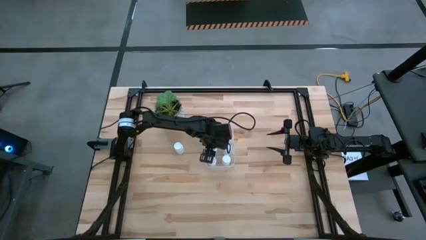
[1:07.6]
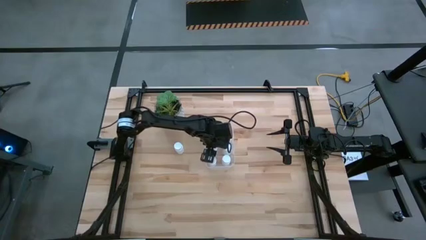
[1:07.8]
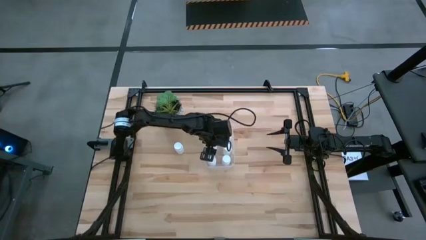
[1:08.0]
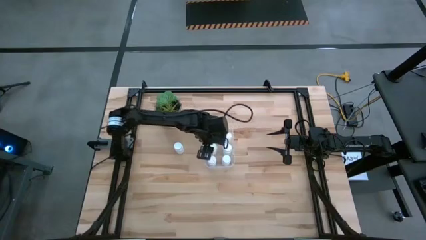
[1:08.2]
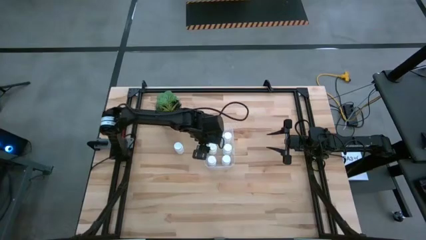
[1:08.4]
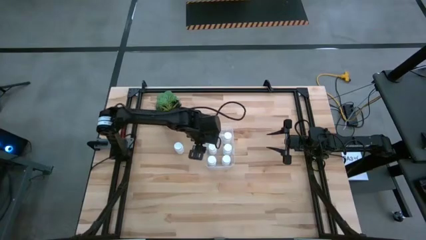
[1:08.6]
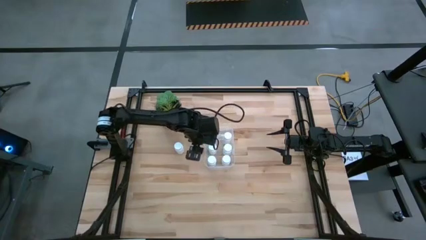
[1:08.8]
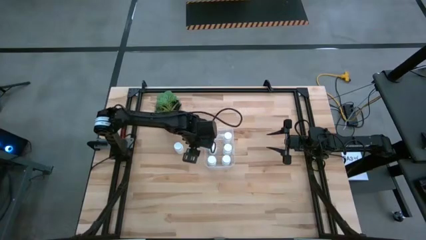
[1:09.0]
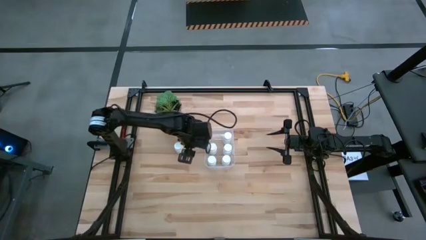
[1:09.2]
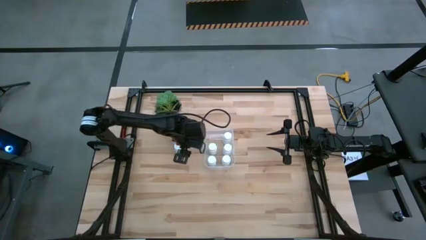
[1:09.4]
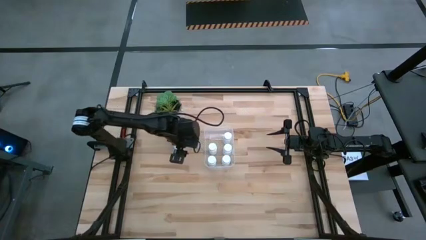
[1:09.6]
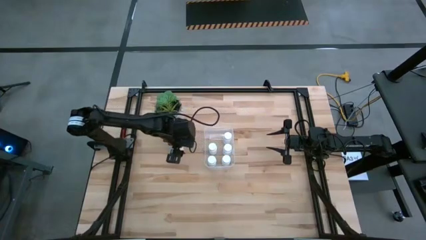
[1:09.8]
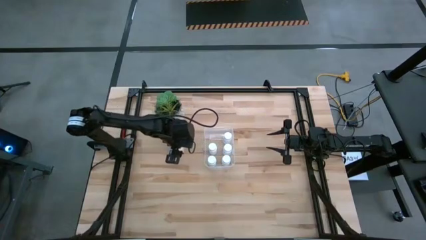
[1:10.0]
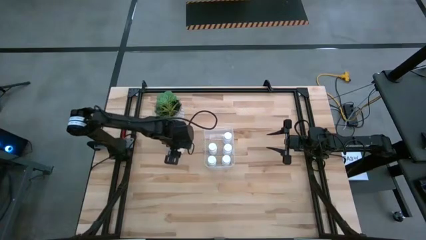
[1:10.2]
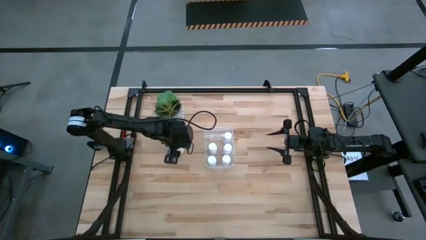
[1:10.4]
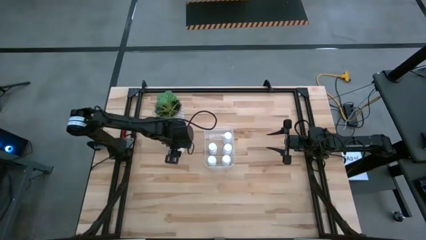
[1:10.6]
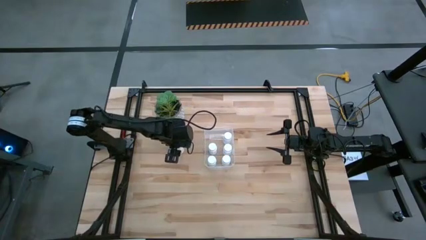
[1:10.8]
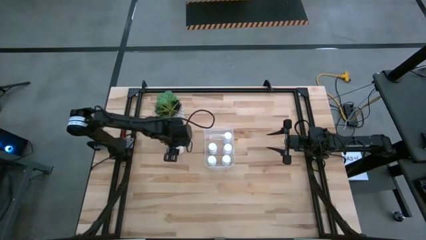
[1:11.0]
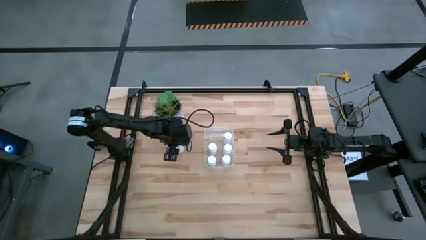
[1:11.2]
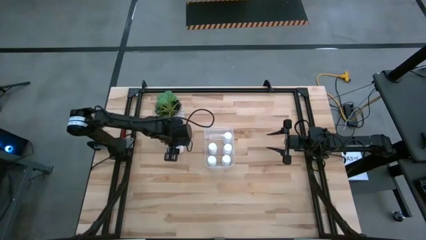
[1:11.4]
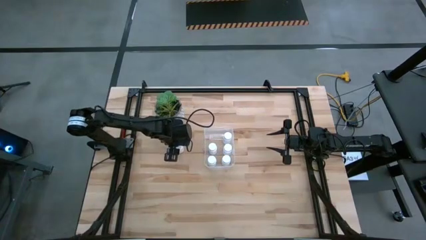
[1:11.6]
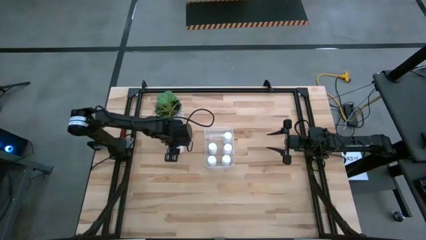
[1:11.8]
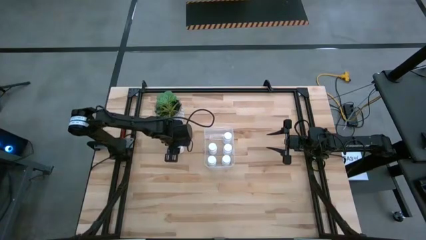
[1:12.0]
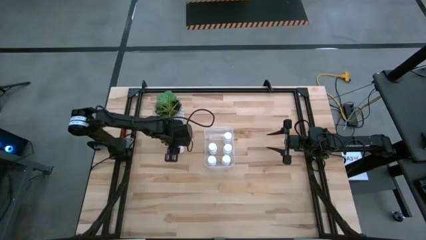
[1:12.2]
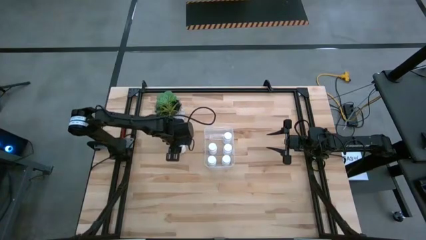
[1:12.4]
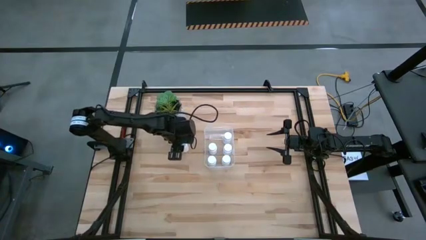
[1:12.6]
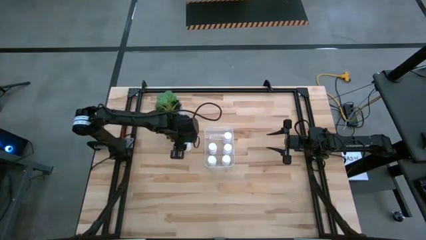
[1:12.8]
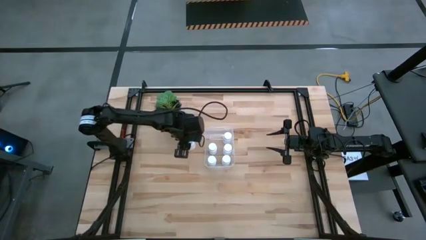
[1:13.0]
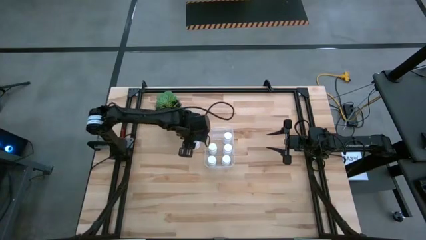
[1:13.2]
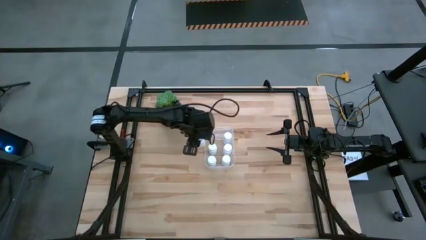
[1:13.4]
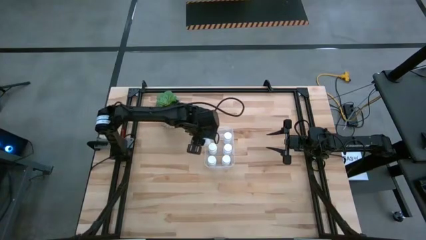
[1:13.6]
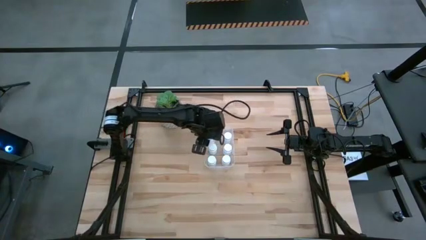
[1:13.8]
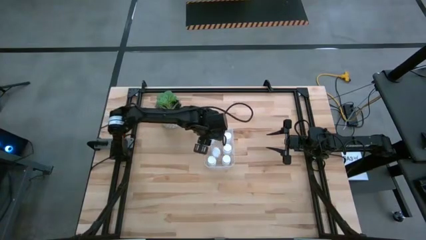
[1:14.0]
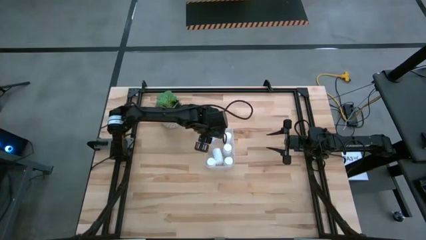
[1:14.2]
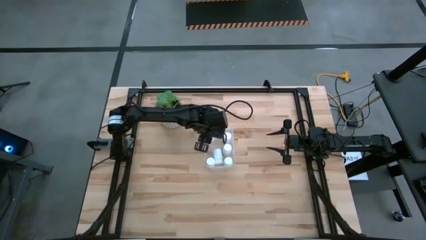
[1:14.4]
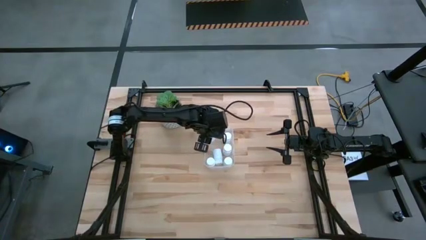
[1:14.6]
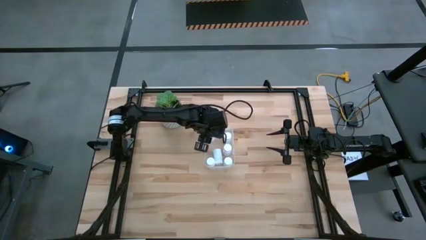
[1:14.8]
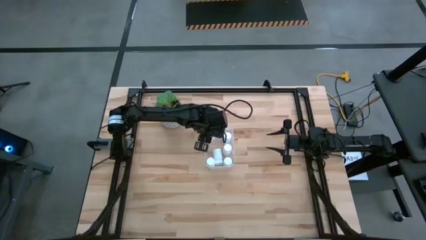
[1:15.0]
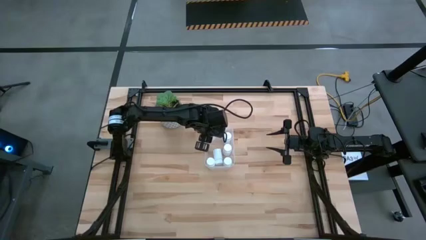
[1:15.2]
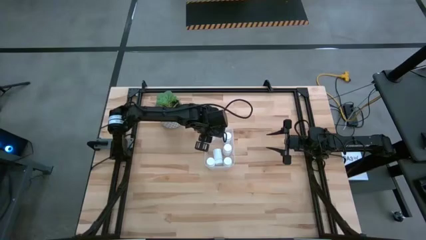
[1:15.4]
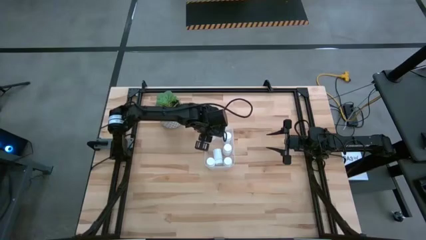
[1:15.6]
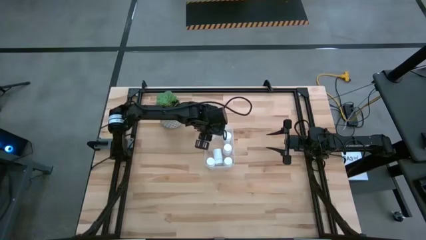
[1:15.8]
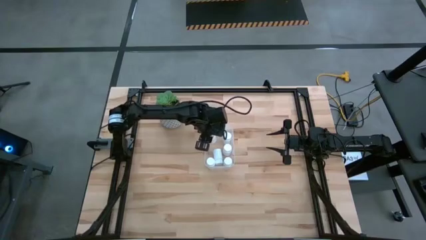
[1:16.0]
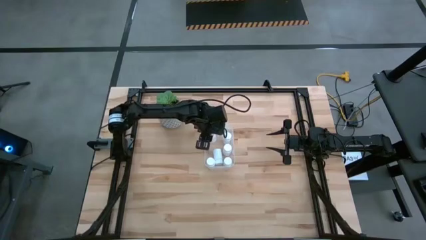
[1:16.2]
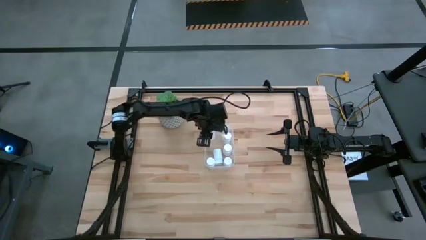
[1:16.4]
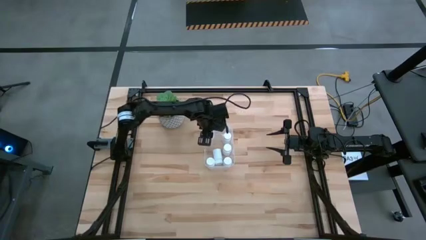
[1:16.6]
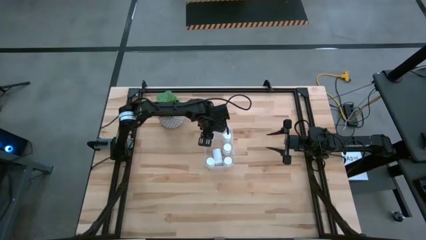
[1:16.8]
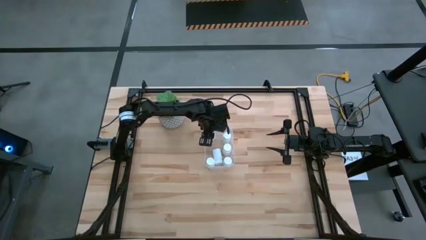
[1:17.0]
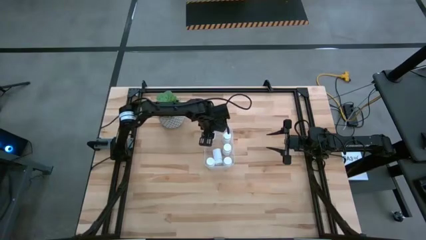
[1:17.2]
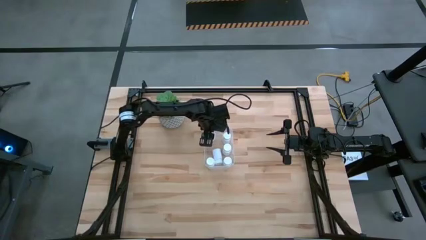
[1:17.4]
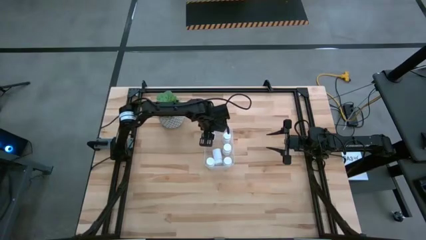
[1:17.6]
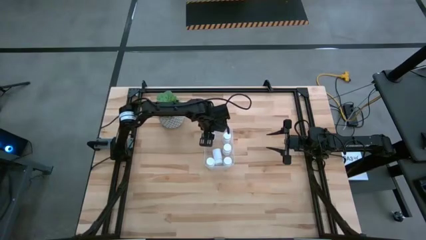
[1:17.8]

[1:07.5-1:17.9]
Task: Pick and place pill bottles into a basket
Put the white pill bottle into the transparent container

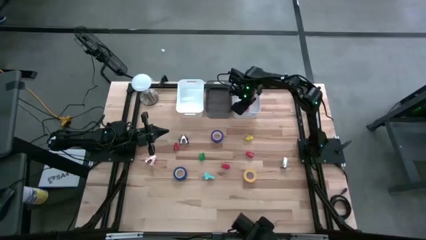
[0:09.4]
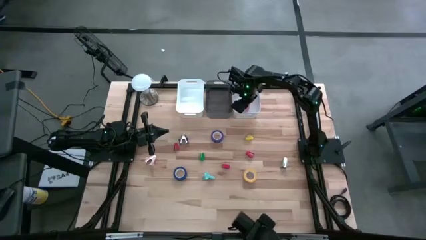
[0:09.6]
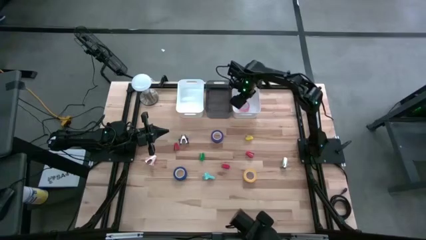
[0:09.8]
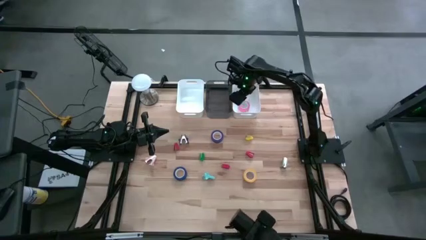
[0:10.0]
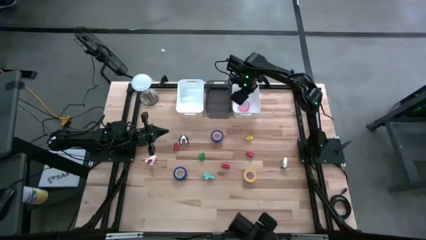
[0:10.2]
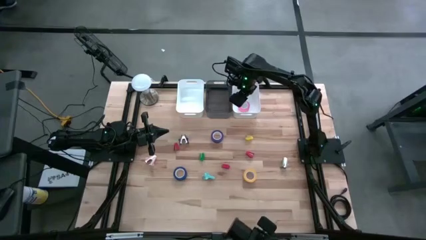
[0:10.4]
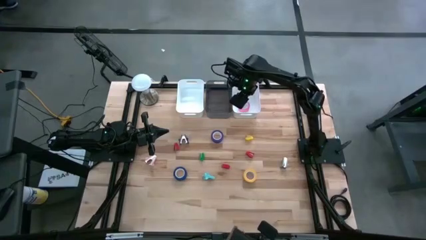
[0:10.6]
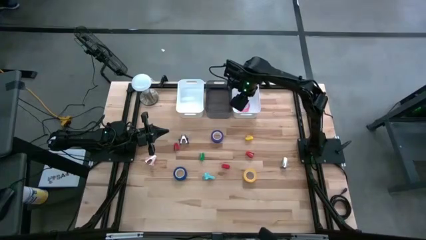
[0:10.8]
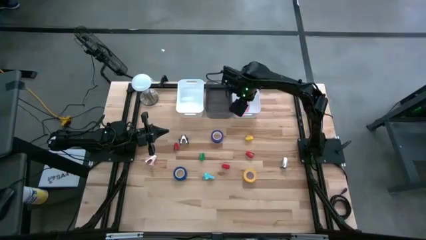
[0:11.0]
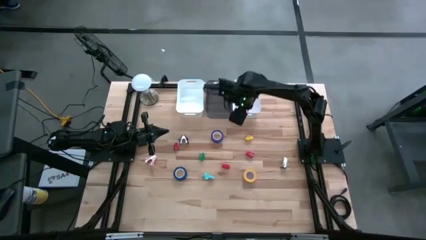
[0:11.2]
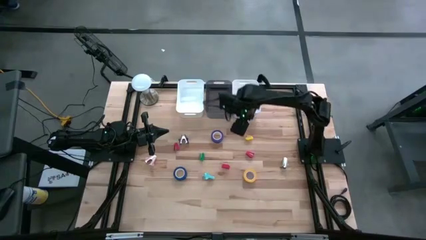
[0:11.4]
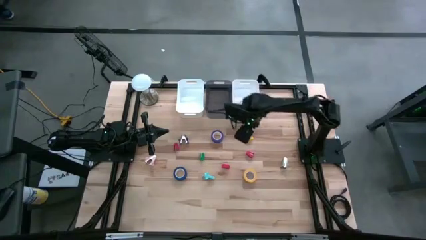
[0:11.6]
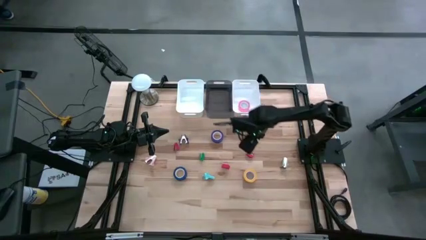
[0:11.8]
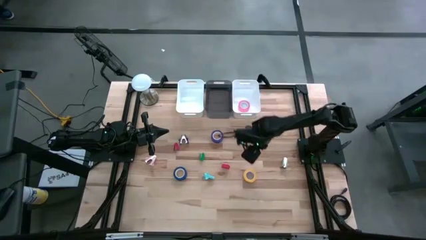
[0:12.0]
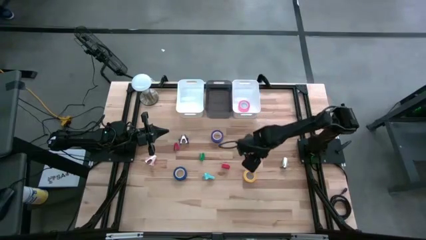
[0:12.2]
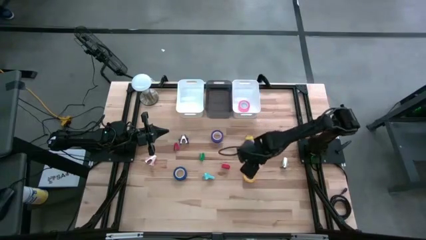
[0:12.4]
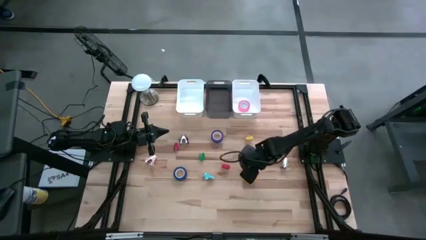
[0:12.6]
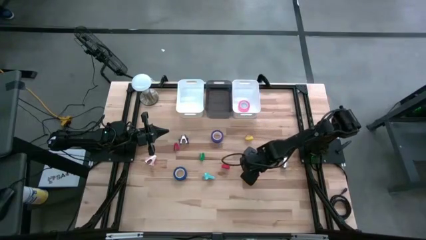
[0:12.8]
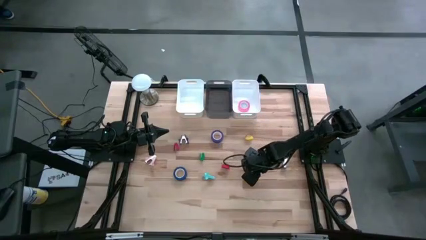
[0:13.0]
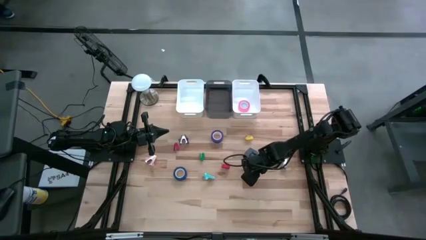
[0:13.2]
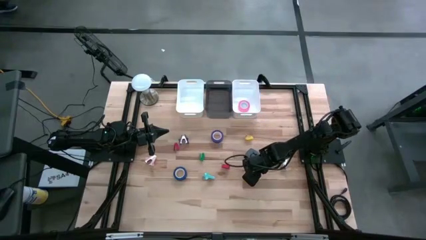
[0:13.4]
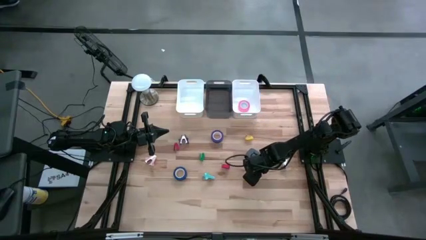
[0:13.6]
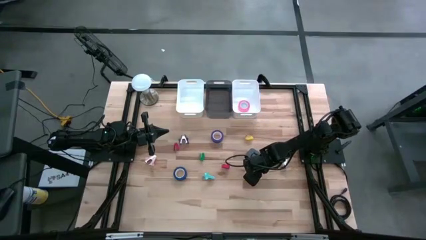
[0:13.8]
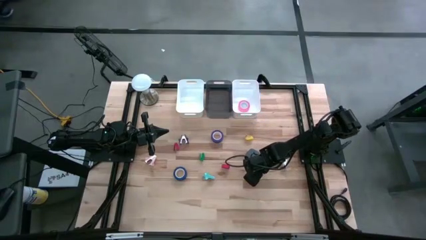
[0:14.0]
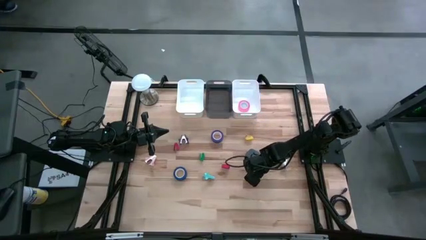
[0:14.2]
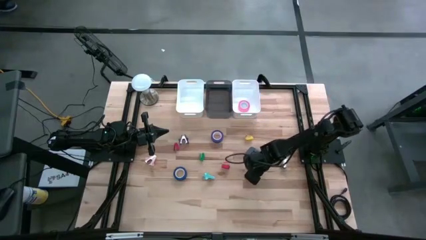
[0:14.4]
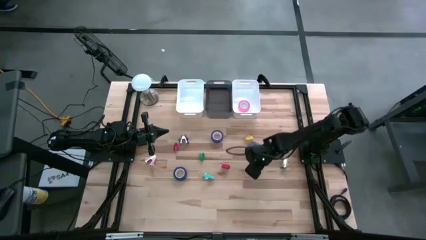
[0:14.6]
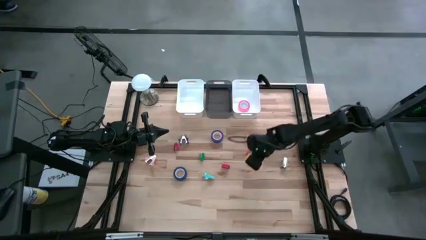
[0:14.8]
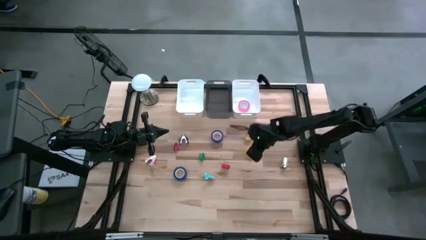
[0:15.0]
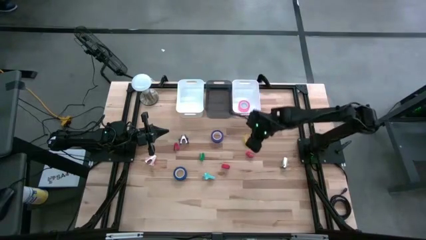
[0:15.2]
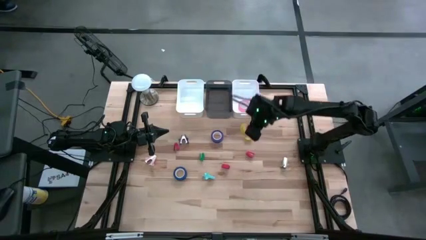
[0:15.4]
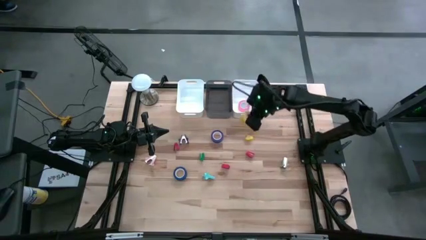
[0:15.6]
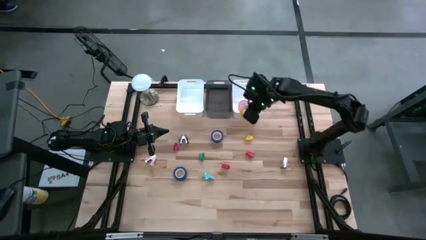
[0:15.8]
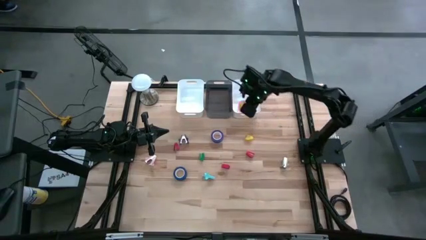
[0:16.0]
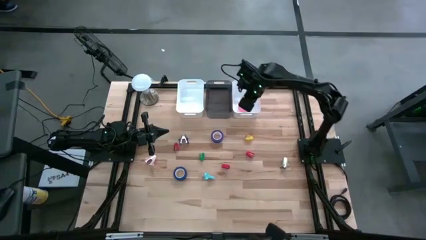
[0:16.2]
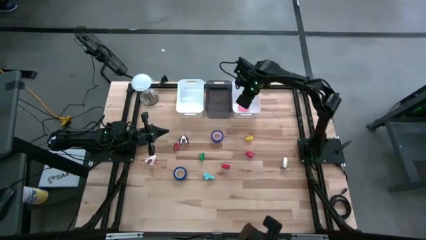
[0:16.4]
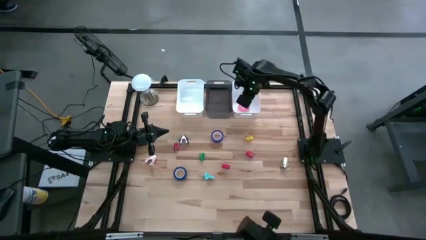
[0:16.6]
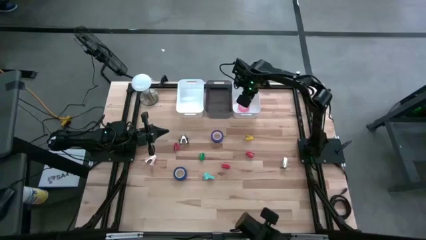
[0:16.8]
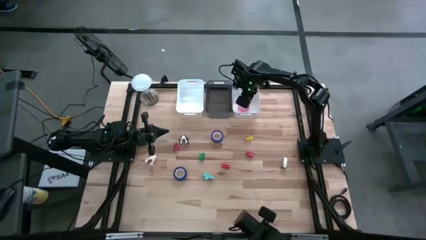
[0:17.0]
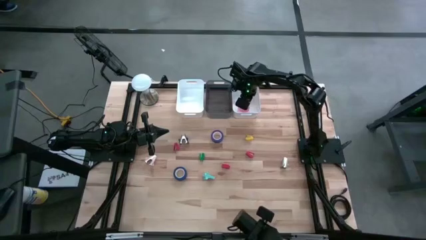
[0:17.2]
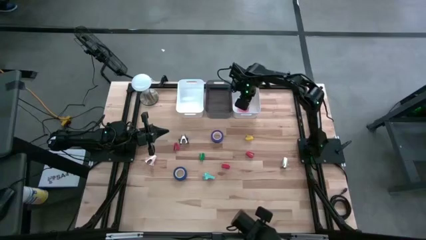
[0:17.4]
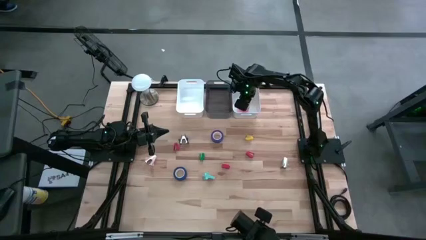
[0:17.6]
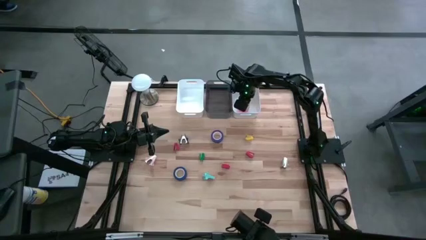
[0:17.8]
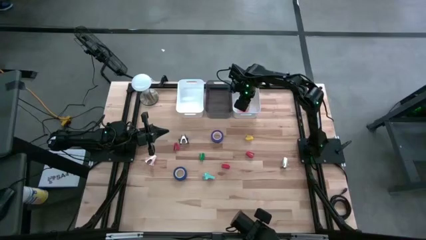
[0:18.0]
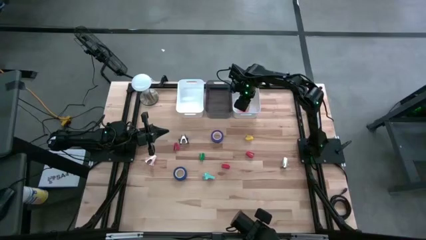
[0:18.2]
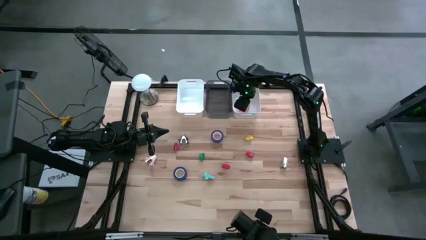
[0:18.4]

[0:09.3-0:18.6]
Task: Pick and place Stapler, Stapler remover, tape
Put the yellow tape into the right white bin
